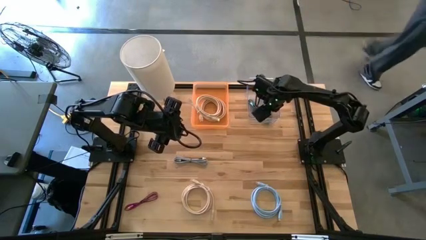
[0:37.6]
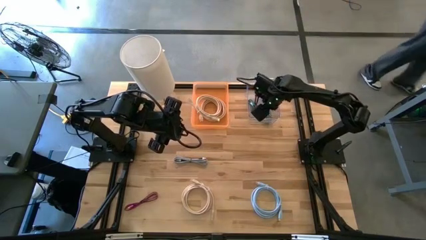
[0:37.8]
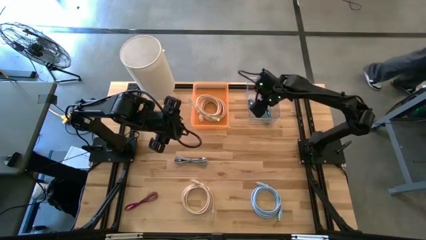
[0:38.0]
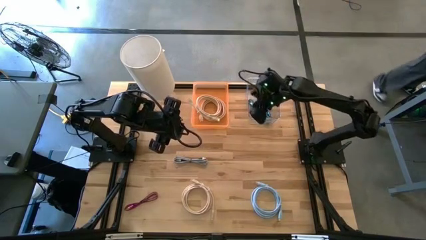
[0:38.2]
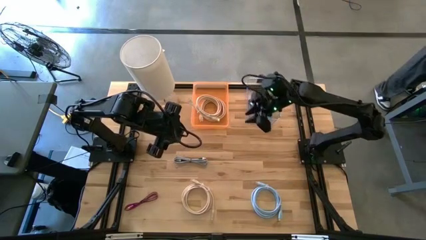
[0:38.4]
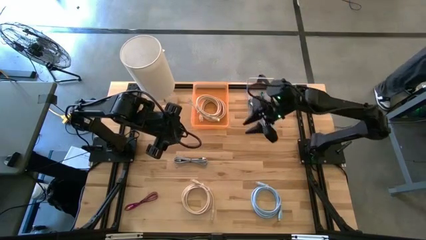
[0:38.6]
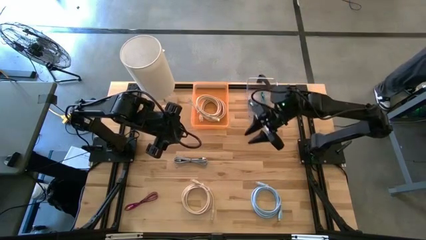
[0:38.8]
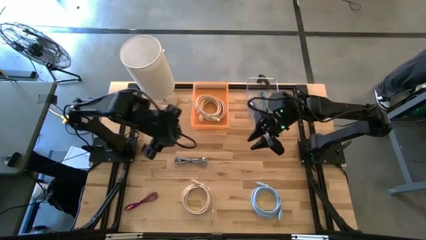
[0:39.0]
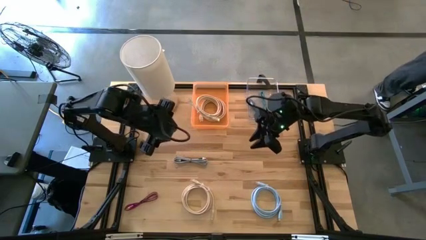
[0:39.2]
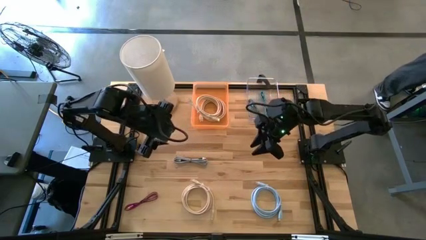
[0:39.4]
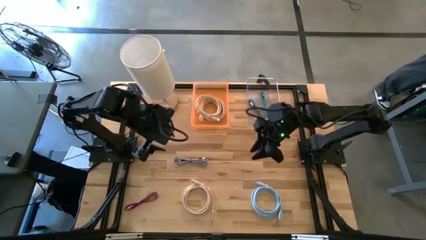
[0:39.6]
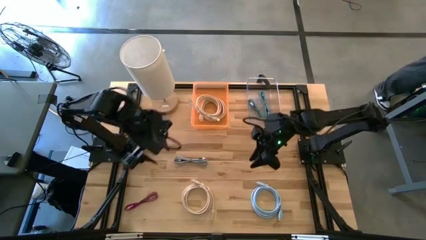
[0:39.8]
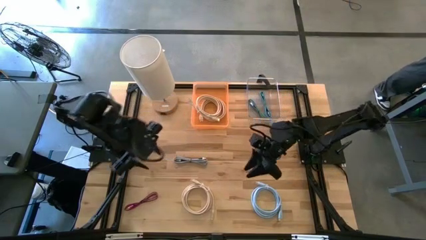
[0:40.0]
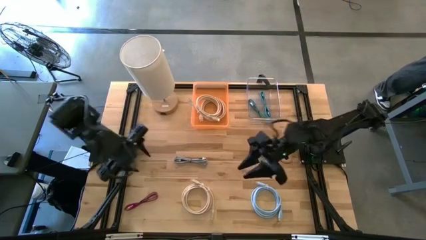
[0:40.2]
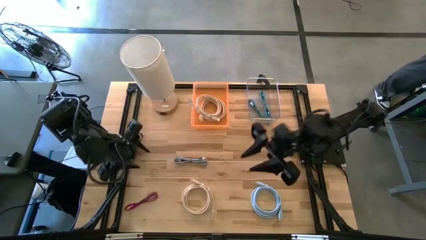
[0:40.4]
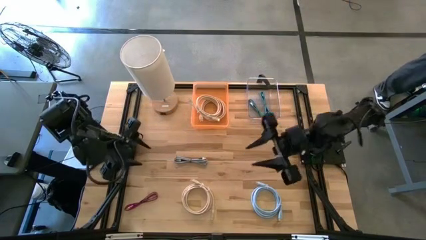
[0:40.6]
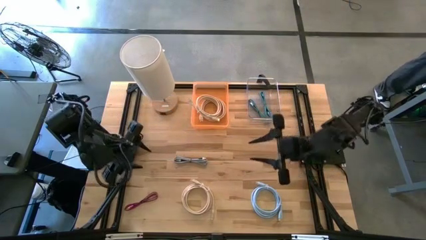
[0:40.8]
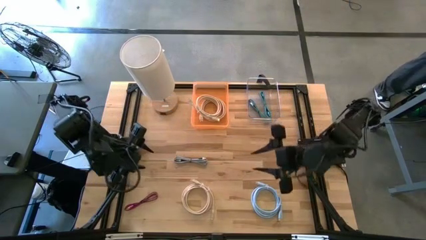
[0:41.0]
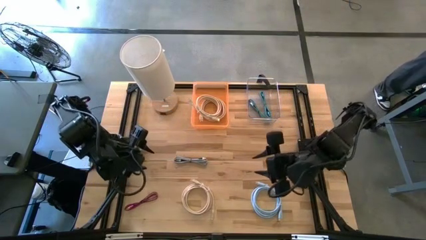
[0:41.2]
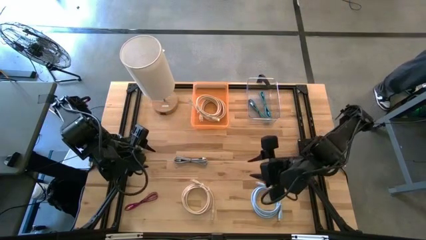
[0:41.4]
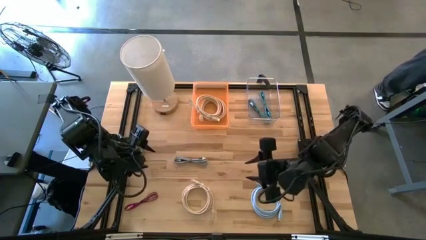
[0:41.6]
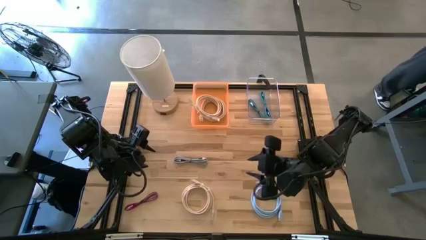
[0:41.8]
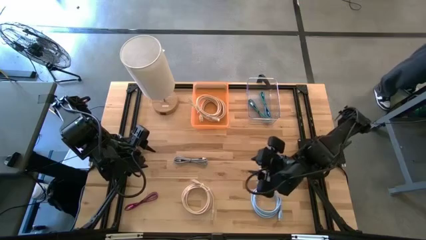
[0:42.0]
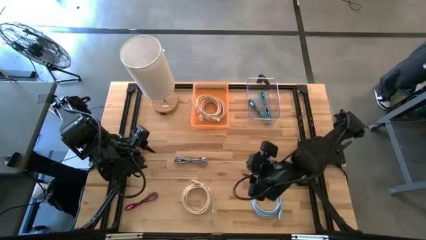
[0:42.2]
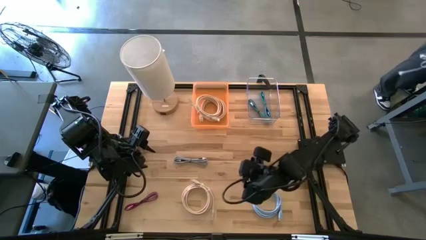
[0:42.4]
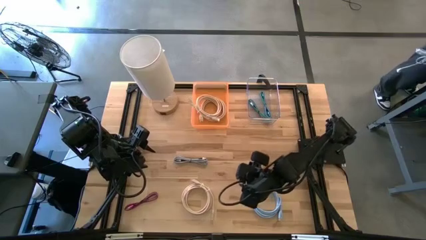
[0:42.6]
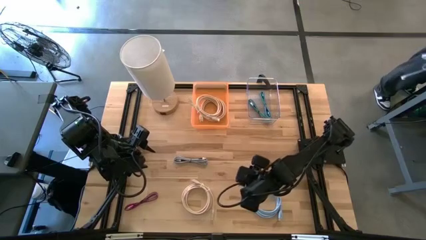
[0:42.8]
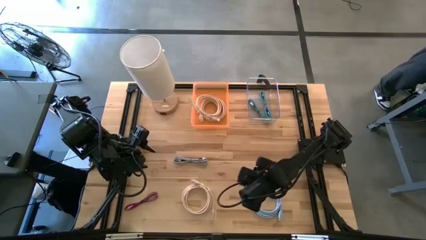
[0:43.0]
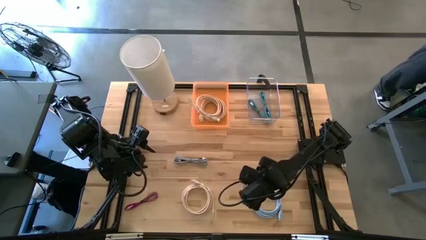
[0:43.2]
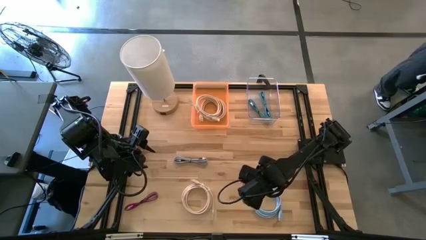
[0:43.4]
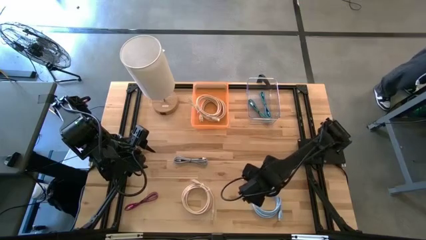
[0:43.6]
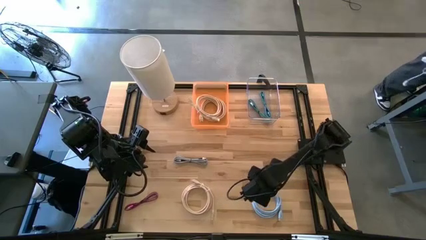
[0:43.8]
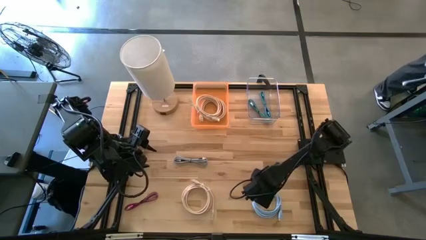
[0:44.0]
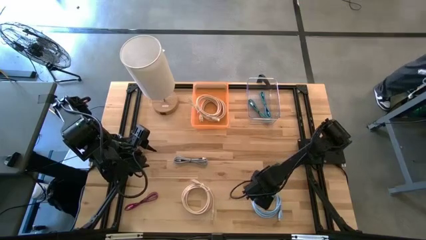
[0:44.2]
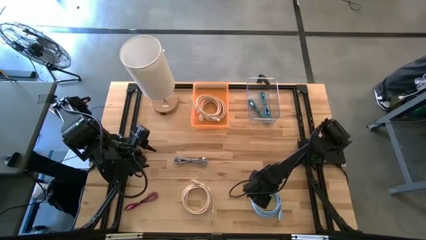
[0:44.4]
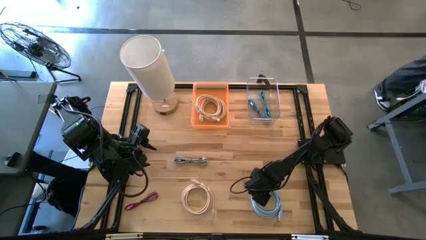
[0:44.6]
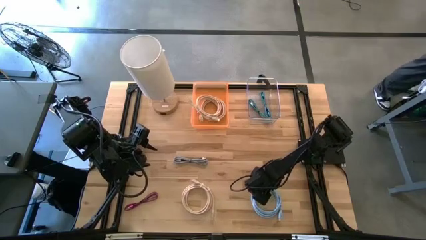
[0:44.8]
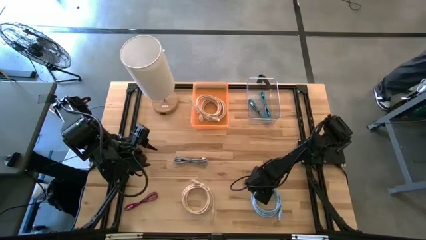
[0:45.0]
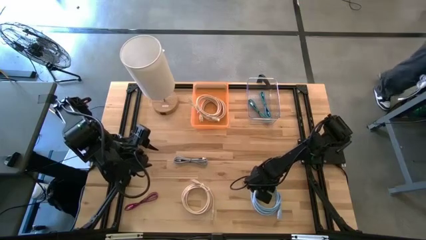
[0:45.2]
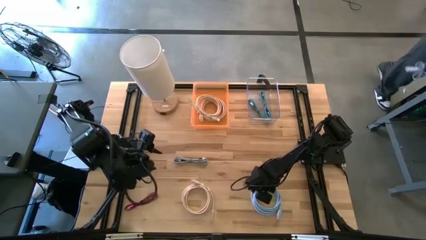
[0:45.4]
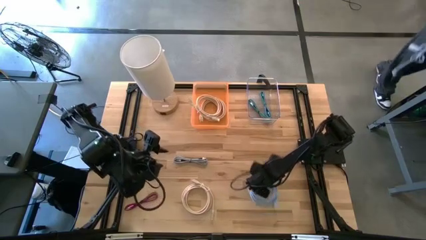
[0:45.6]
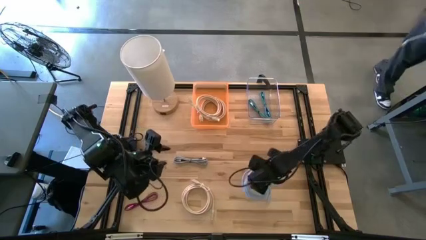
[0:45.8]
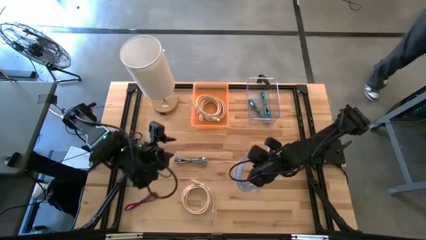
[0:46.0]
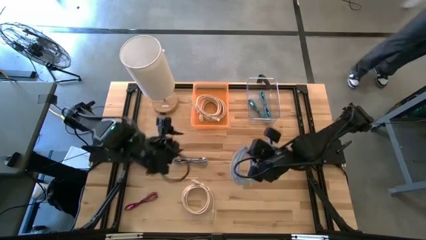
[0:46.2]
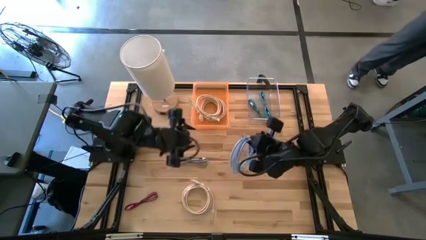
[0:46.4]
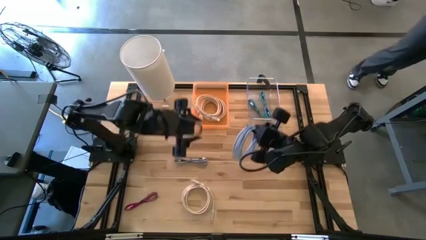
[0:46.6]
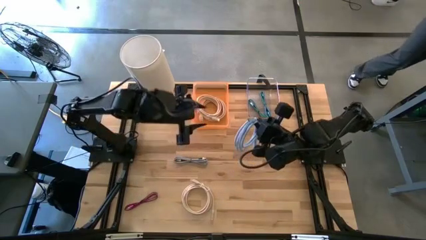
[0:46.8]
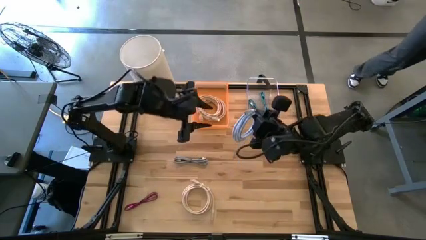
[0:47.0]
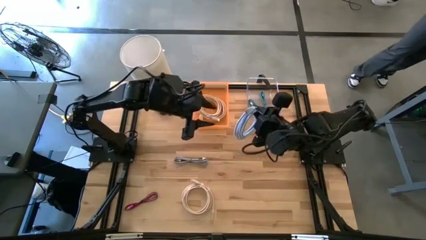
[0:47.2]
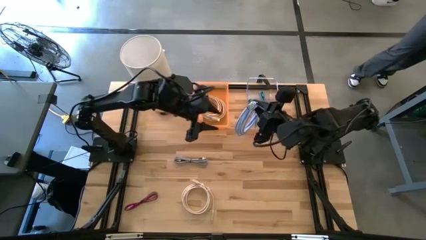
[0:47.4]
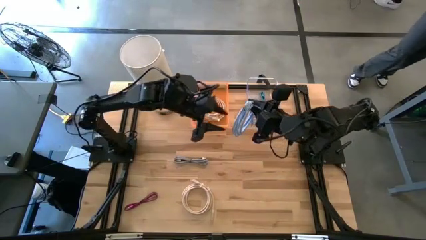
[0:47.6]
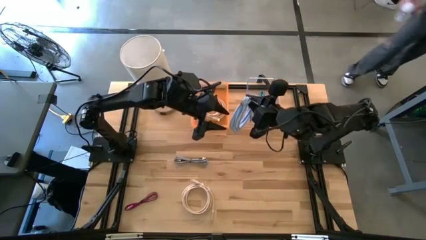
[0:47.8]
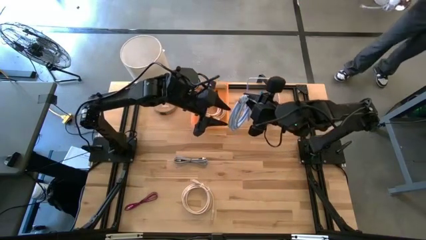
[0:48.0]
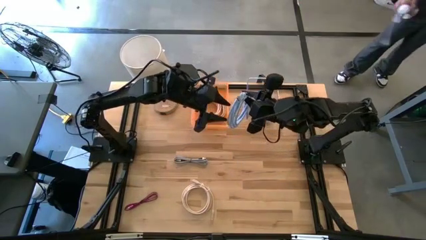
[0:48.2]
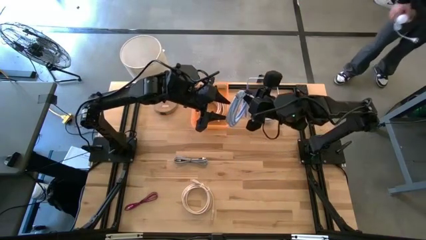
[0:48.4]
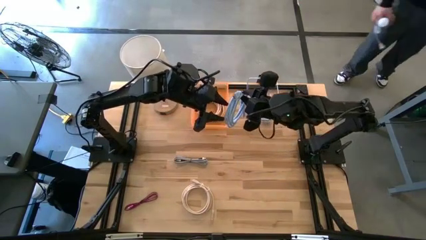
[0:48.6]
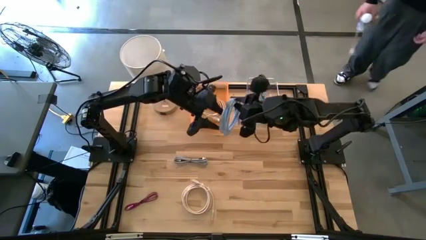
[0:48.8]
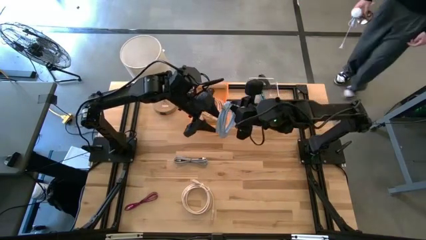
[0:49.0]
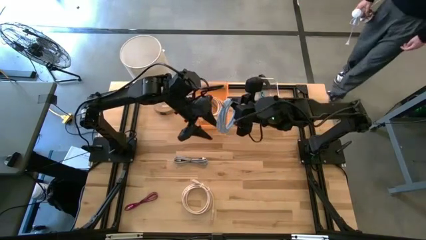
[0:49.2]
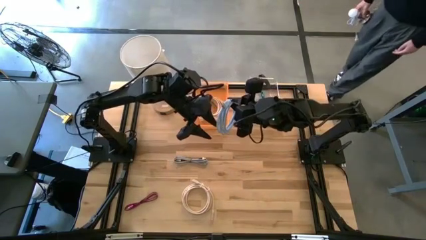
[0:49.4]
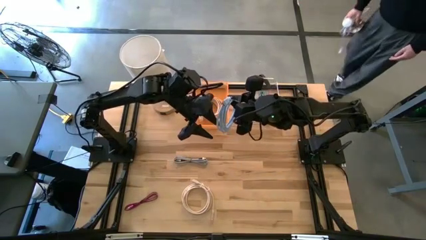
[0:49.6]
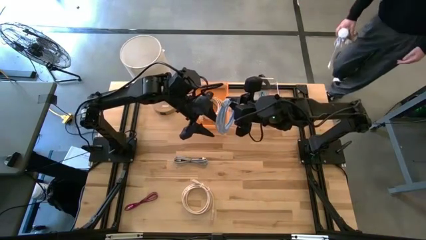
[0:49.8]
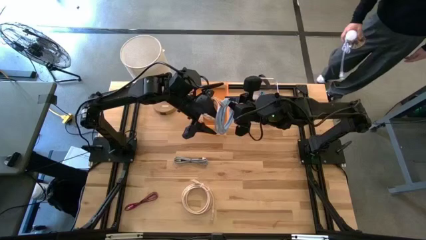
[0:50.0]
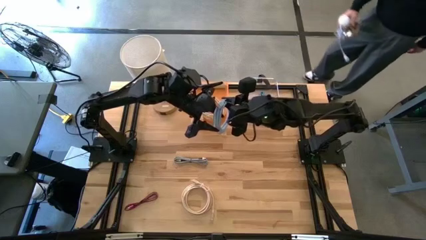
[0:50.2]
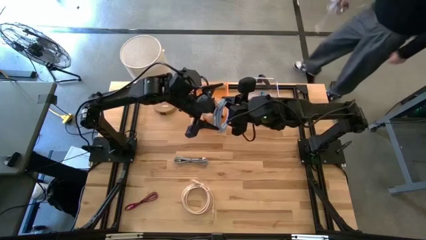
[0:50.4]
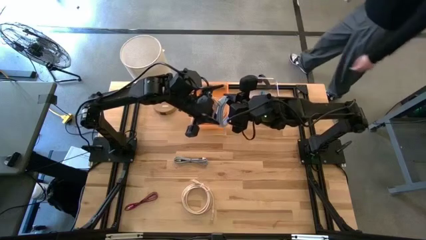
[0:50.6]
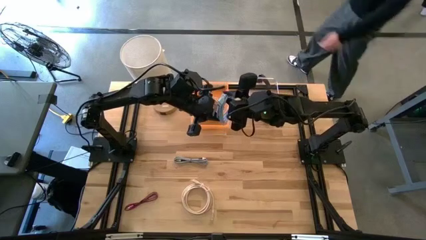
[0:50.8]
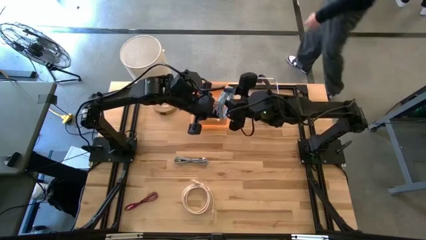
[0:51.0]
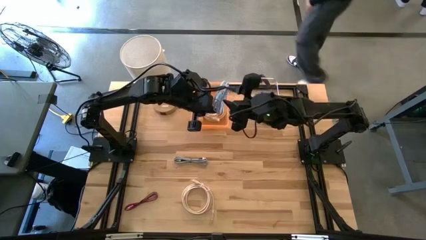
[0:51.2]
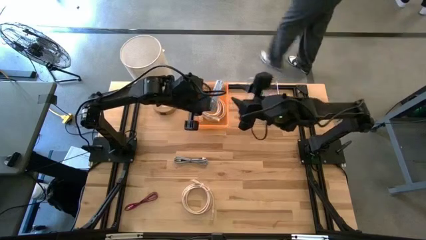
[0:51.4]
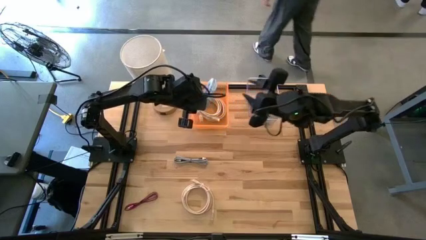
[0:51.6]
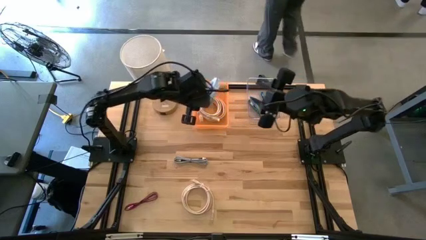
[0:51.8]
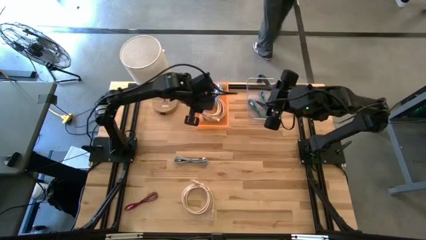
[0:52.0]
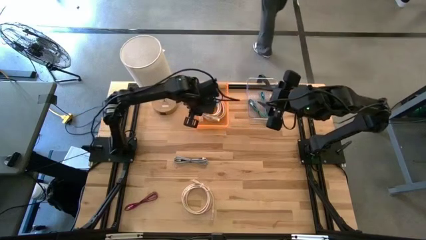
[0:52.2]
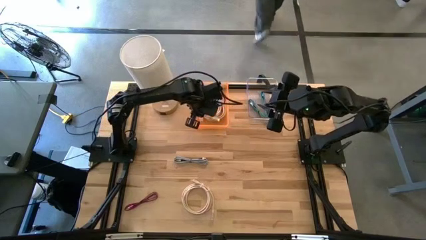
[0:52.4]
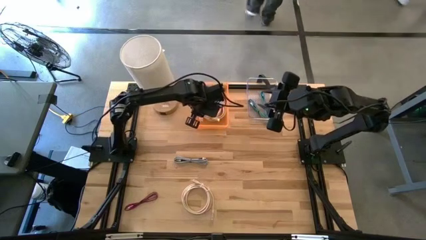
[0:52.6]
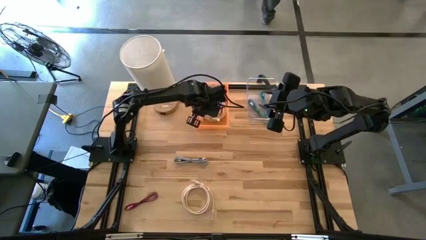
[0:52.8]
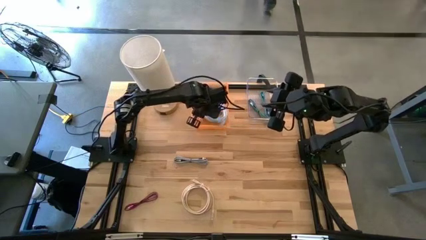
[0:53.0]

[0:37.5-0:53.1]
Task: Pick & Place USB Port
Put the blue HDMI cable into the orange bin
